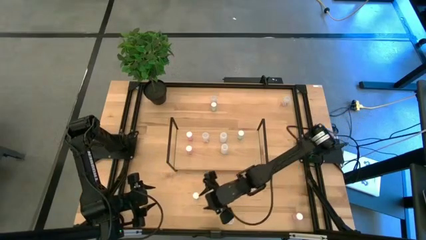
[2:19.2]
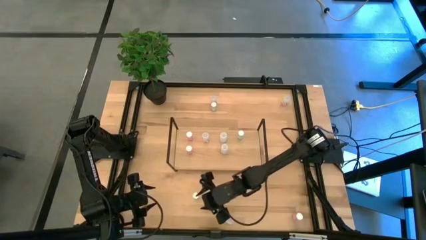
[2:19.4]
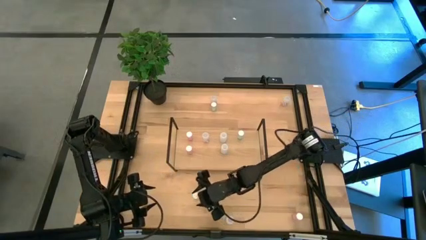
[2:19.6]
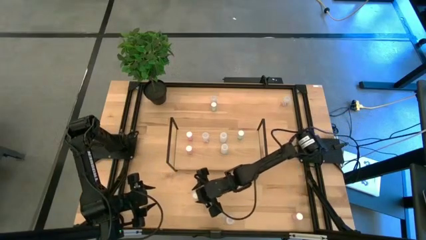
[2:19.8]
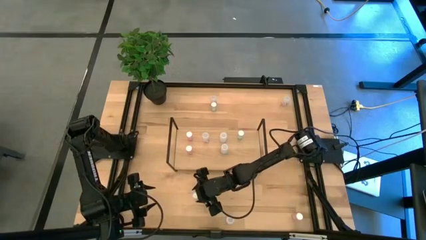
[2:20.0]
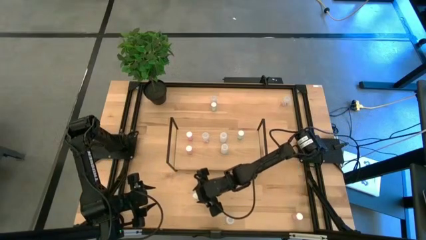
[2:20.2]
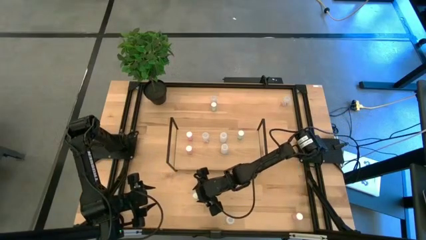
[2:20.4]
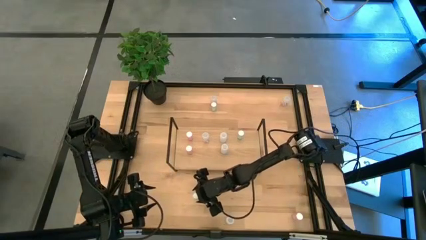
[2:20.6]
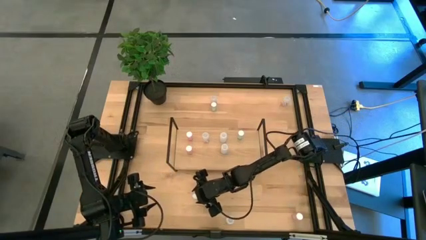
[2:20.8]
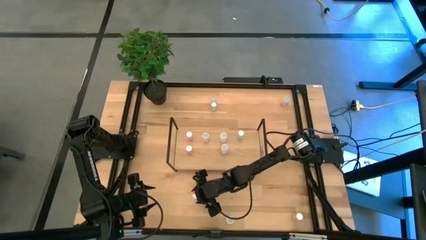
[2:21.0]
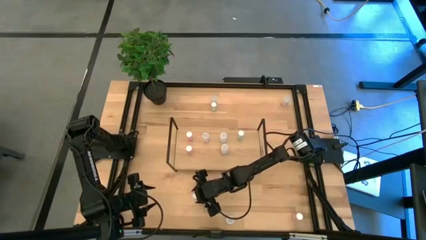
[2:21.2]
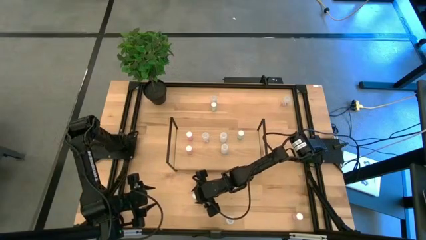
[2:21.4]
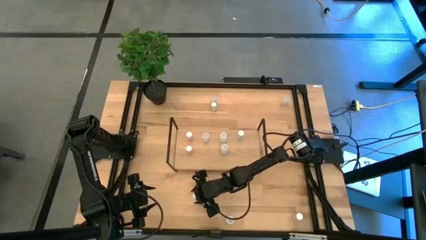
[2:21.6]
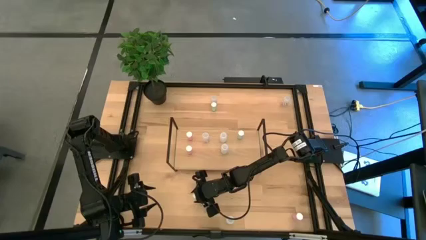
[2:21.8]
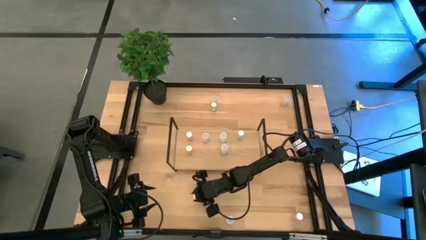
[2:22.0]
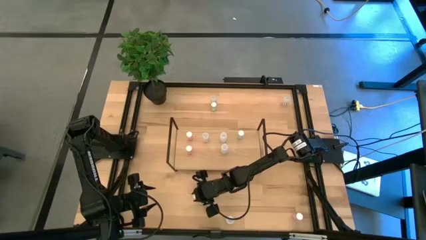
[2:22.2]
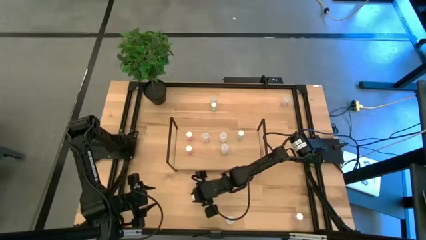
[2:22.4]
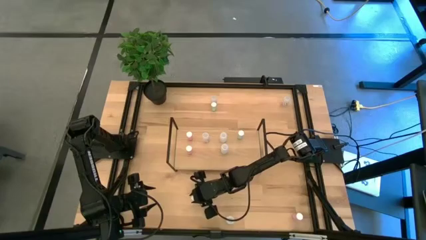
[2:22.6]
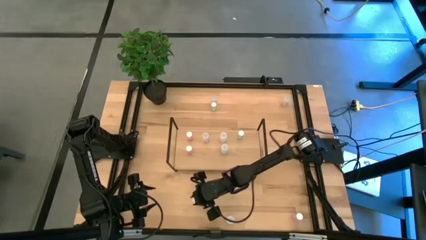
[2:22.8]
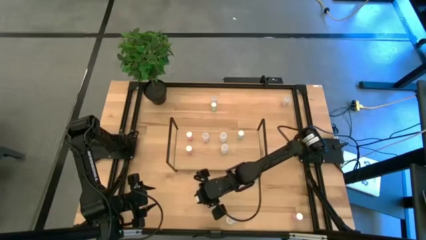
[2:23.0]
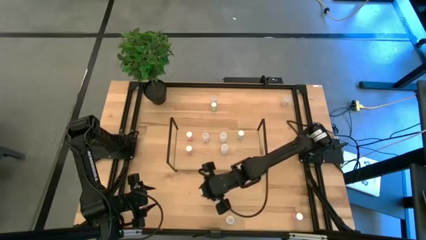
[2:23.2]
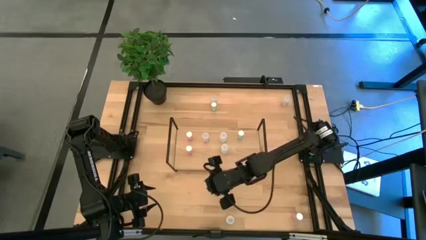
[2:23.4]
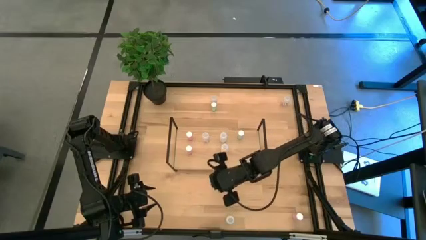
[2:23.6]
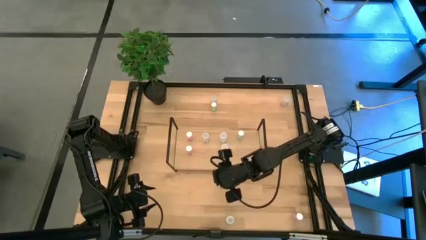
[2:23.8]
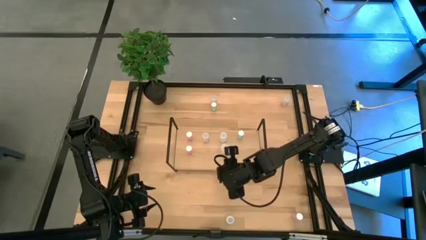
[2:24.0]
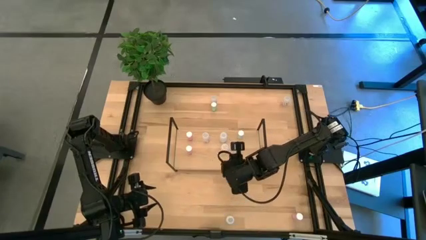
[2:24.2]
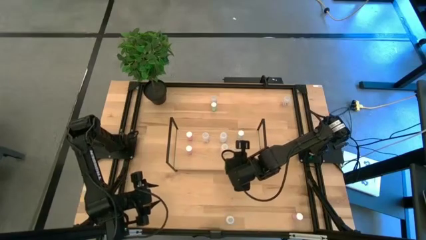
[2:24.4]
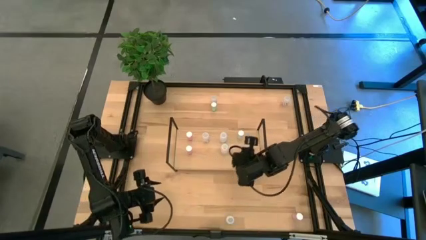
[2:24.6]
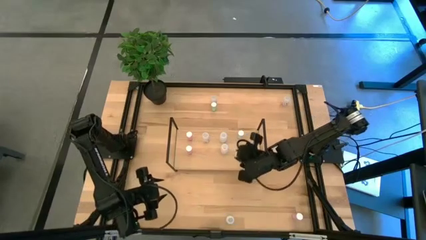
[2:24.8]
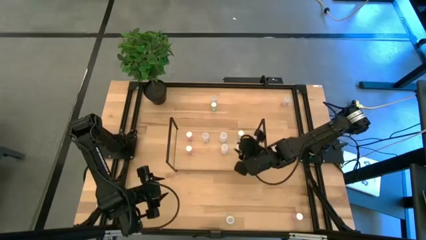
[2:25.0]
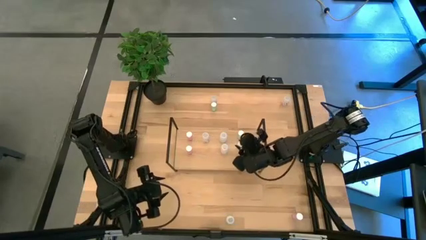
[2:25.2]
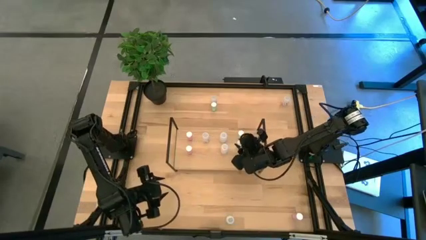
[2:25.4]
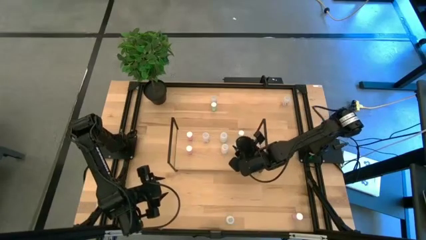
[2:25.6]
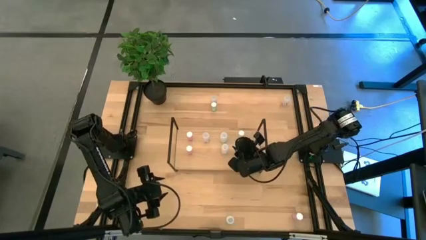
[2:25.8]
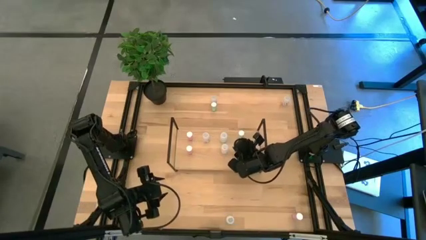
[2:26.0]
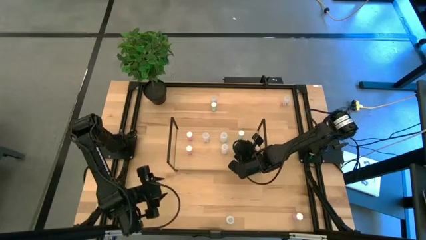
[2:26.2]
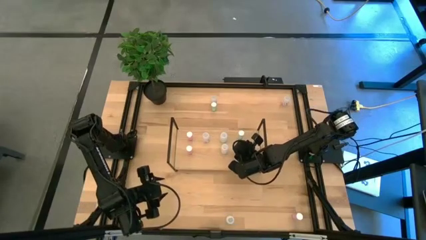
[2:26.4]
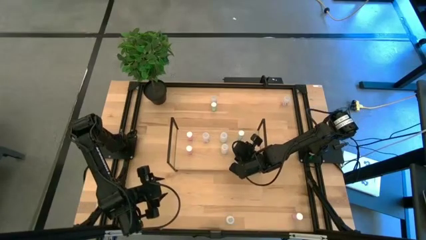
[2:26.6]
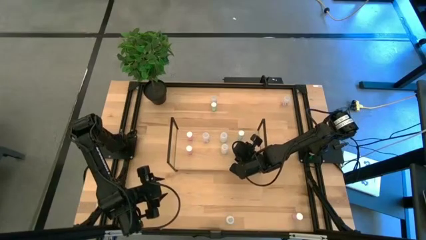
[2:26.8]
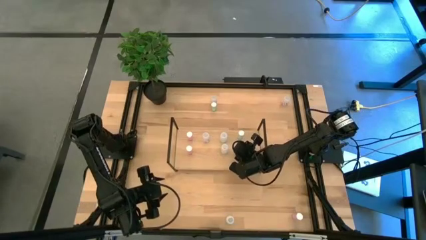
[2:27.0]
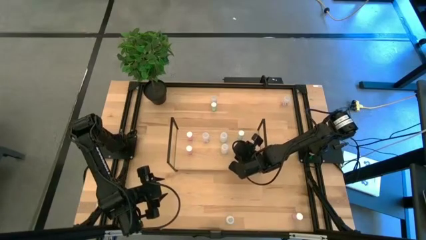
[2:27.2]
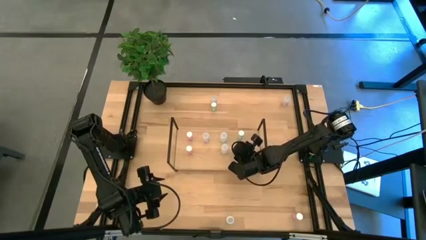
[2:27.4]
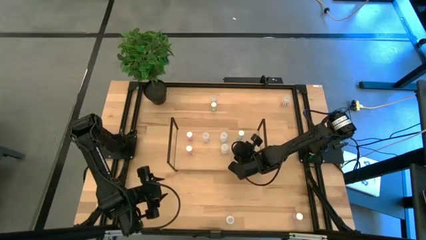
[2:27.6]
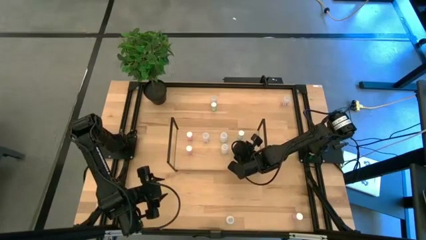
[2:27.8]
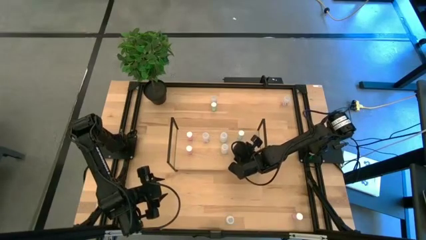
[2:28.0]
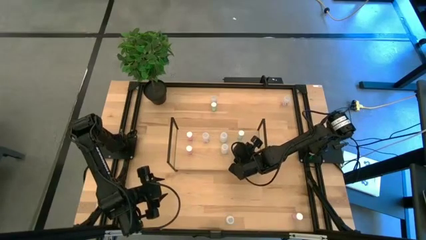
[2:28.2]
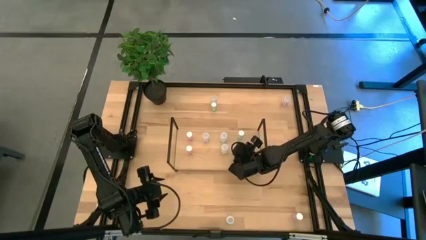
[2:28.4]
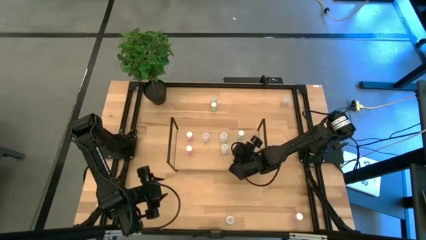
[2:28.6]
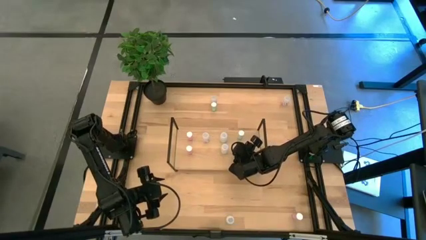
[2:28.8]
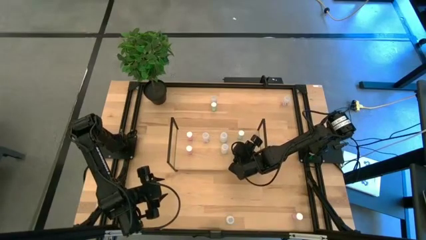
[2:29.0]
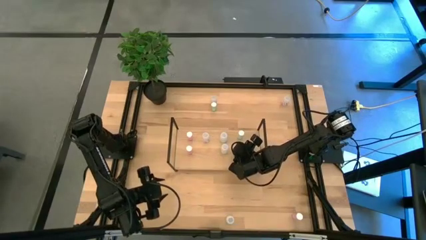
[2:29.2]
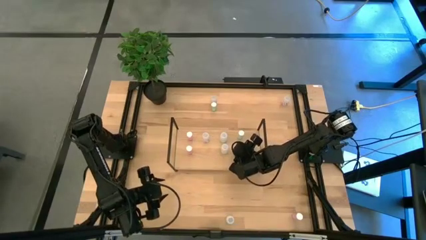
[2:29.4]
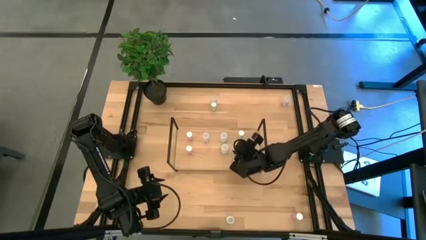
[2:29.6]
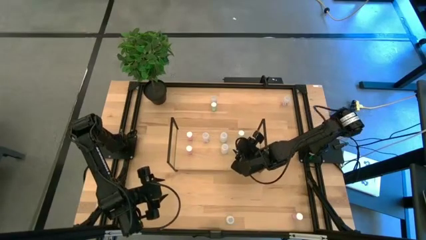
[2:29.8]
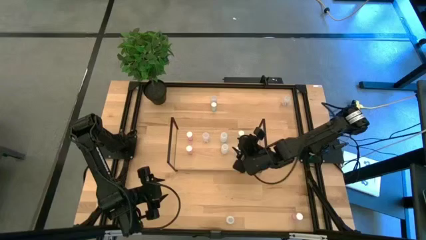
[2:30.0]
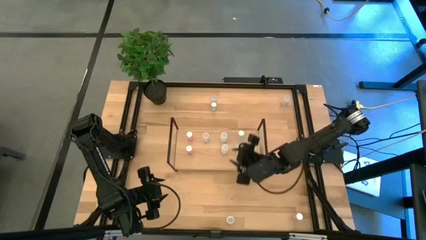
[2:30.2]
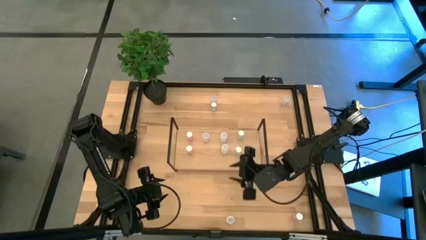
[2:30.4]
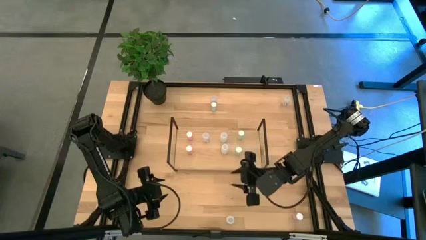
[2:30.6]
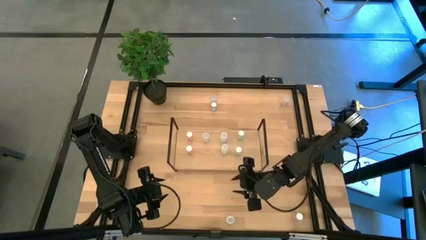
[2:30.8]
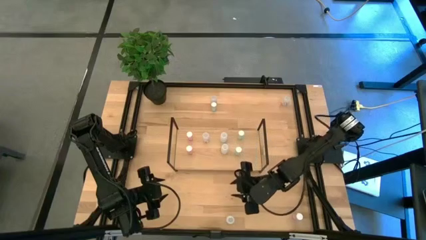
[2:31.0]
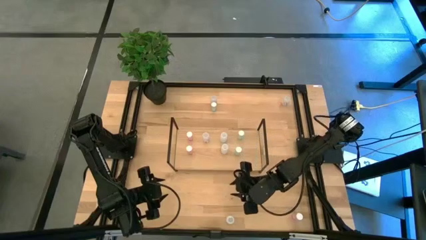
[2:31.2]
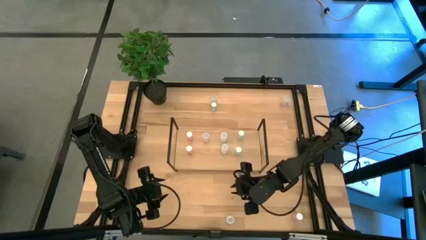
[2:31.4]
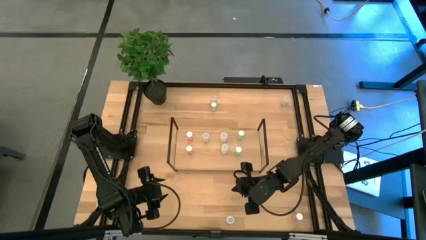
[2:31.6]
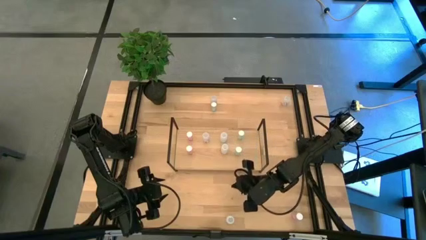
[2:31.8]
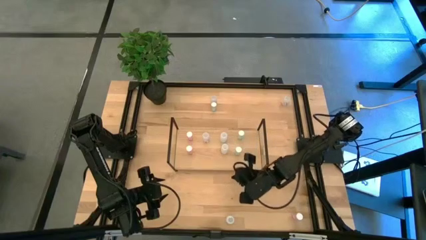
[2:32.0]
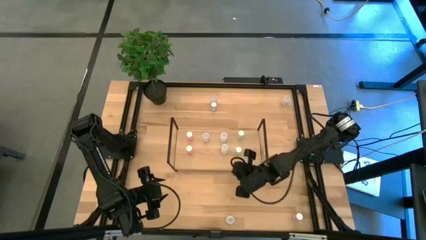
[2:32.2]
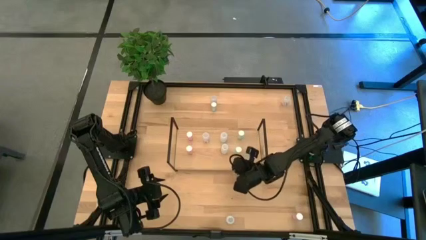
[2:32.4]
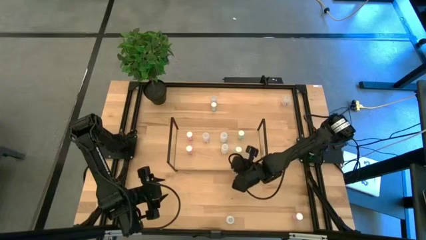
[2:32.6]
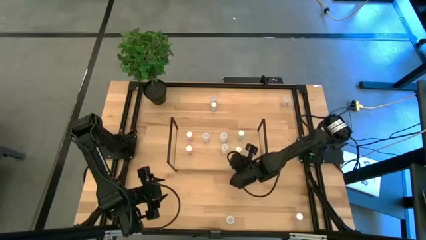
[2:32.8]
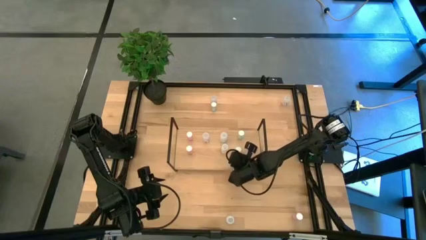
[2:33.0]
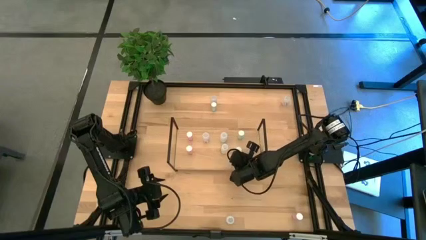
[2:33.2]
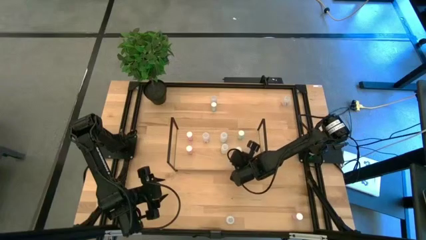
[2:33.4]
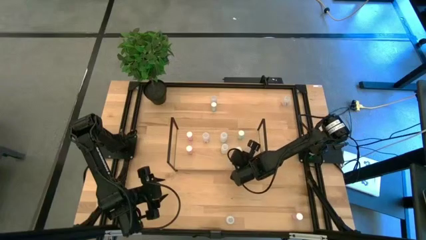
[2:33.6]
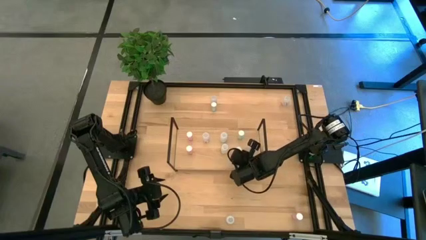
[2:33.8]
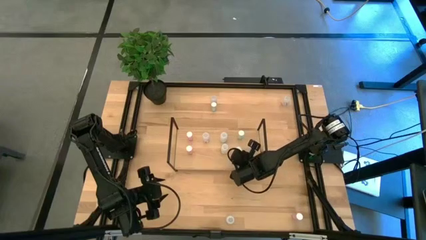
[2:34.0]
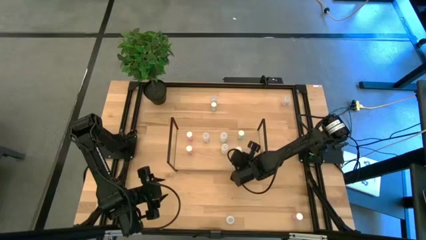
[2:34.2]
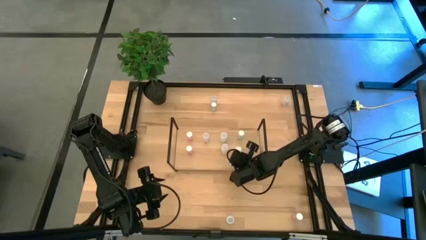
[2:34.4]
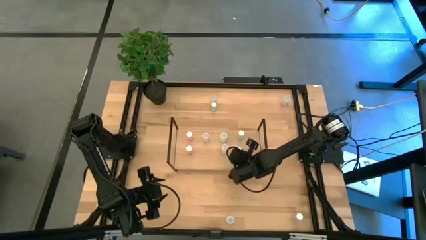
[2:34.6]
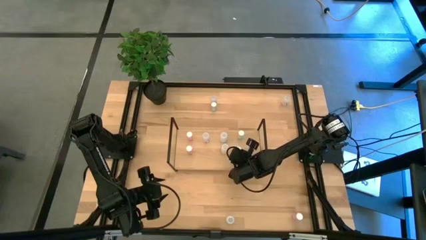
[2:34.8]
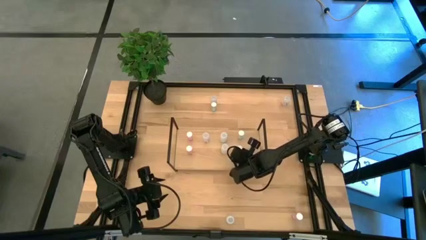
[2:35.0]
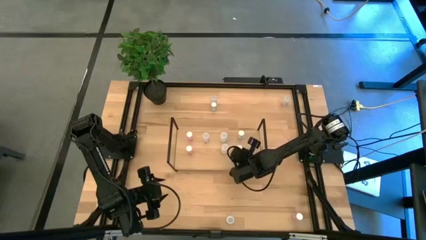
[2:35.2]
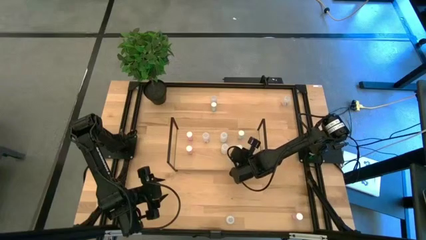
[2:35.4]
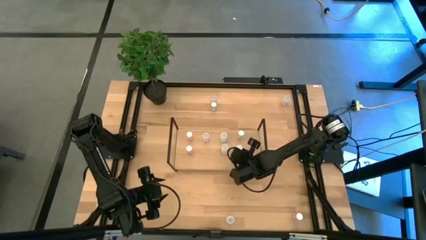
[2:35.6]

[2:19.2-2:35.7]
Task: Pick and place medicine bottles onto shelf by color
Put the bottom blue pill bottle on the shelf aligned with the other blue pill bottles
